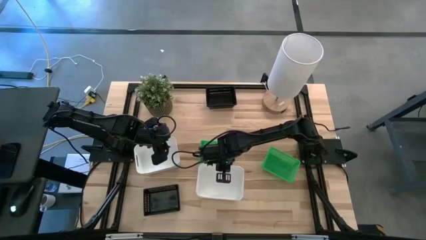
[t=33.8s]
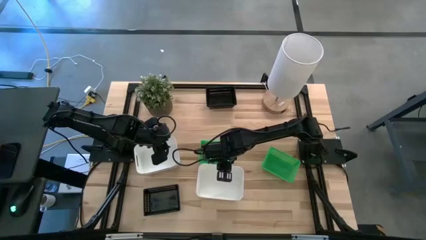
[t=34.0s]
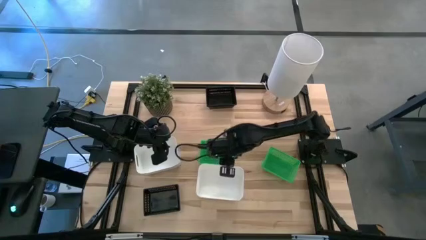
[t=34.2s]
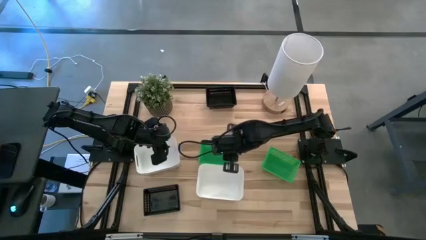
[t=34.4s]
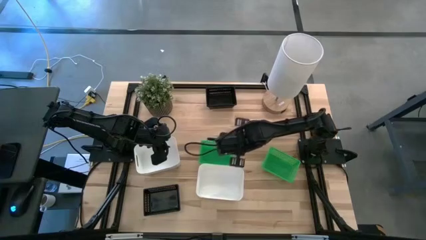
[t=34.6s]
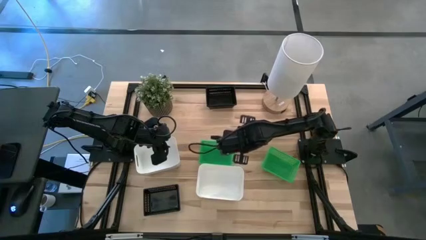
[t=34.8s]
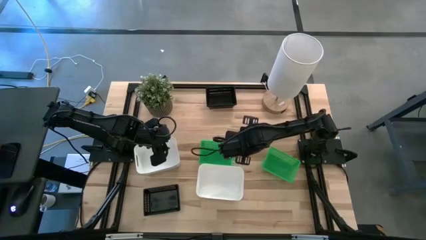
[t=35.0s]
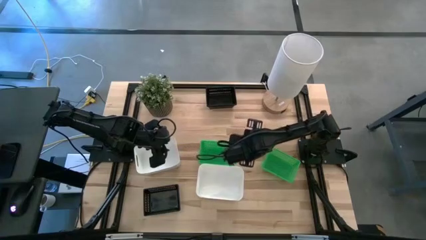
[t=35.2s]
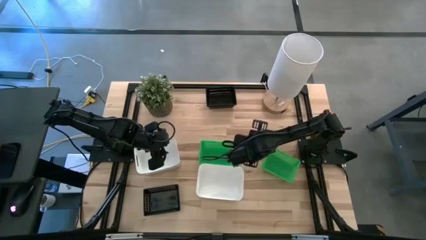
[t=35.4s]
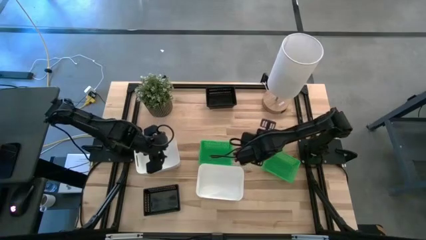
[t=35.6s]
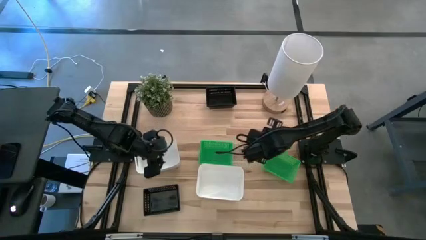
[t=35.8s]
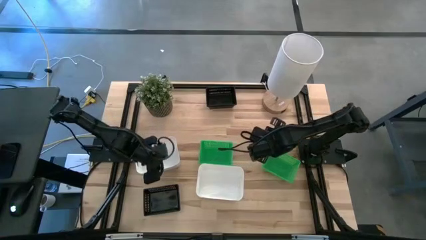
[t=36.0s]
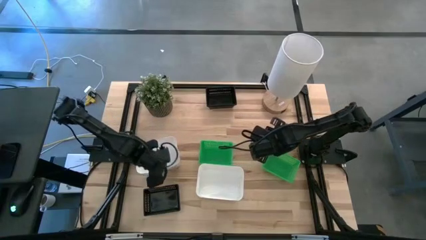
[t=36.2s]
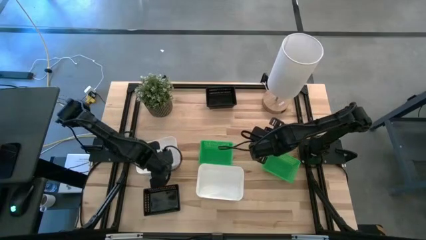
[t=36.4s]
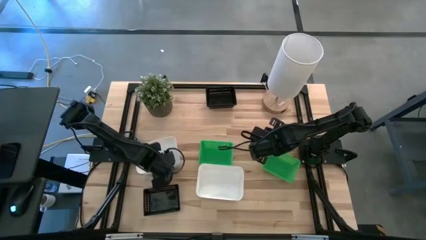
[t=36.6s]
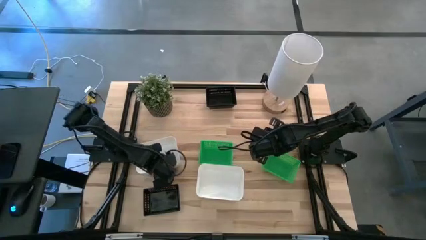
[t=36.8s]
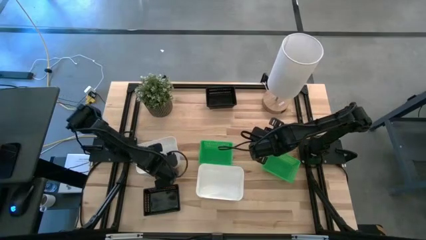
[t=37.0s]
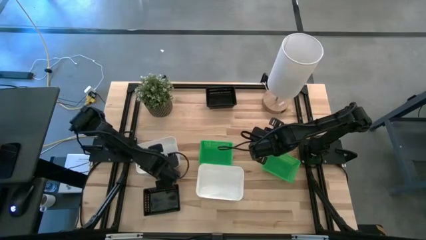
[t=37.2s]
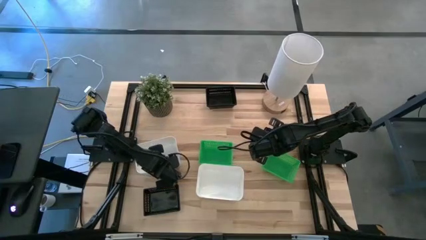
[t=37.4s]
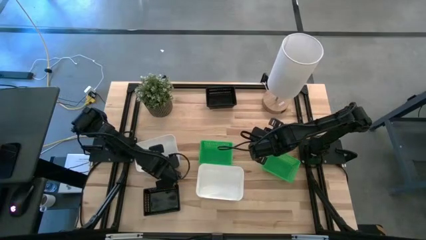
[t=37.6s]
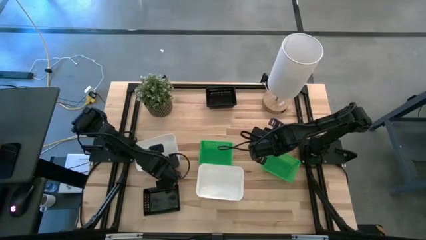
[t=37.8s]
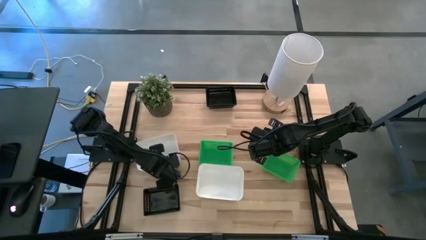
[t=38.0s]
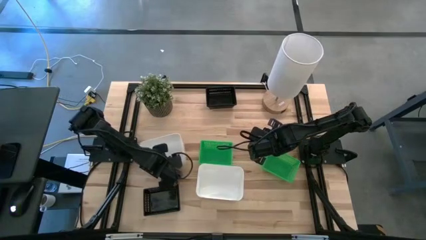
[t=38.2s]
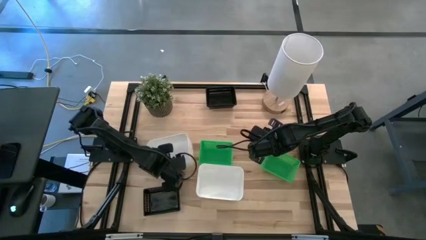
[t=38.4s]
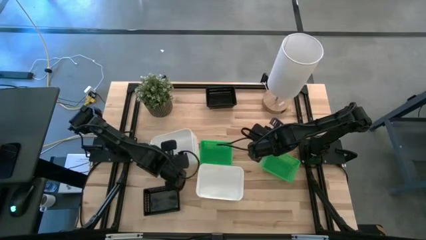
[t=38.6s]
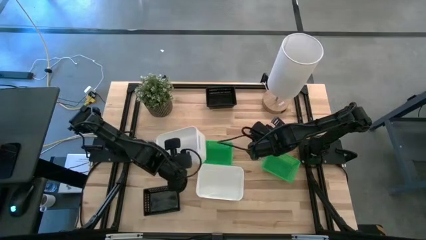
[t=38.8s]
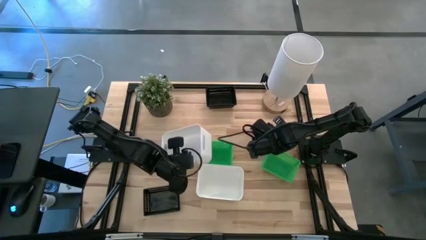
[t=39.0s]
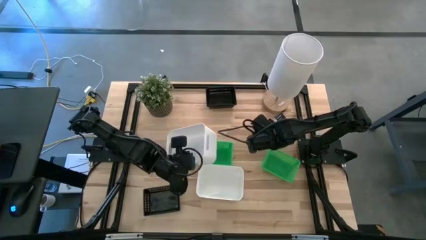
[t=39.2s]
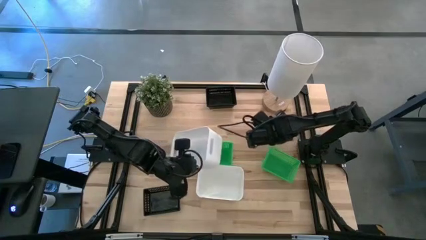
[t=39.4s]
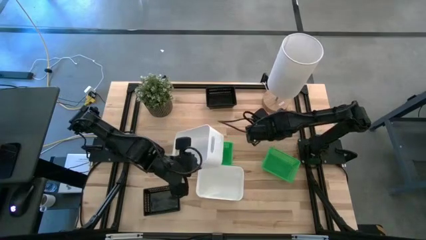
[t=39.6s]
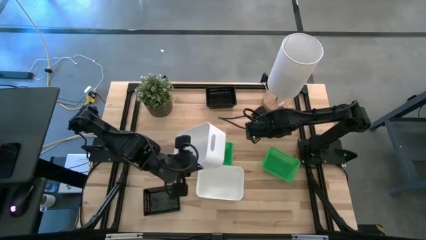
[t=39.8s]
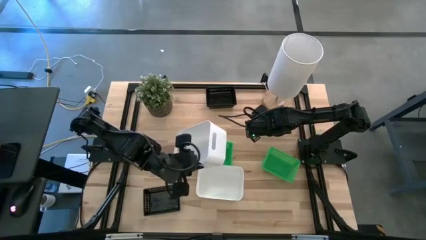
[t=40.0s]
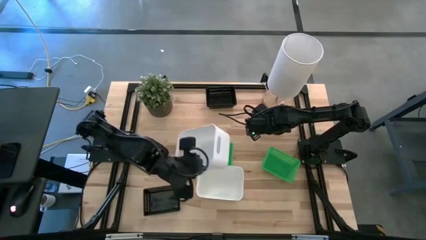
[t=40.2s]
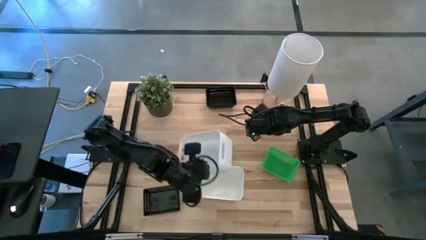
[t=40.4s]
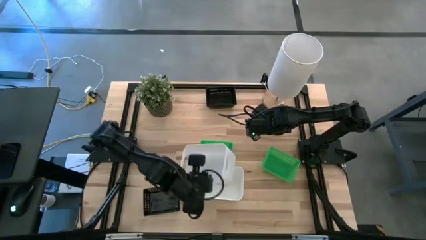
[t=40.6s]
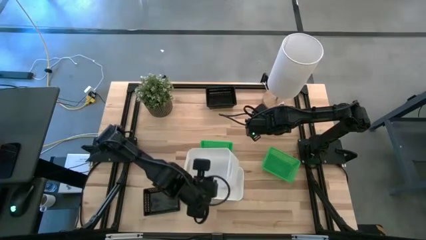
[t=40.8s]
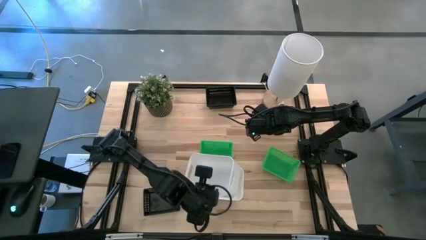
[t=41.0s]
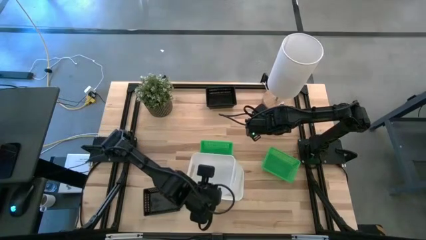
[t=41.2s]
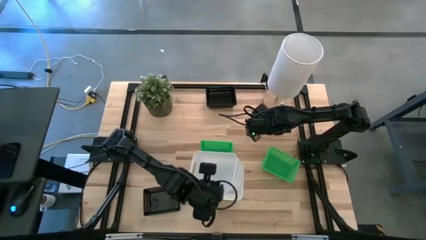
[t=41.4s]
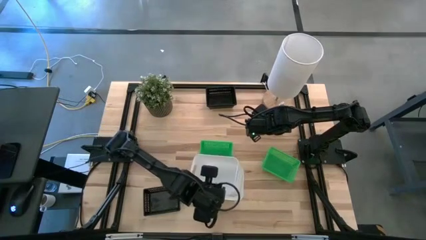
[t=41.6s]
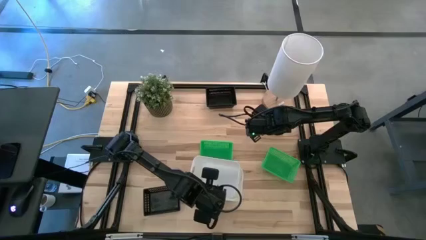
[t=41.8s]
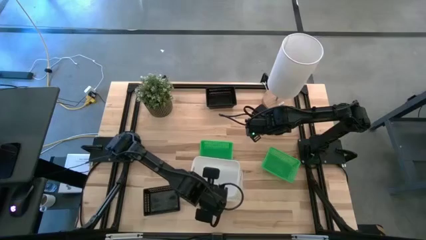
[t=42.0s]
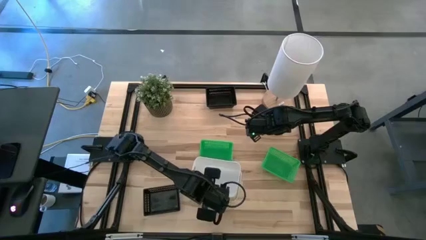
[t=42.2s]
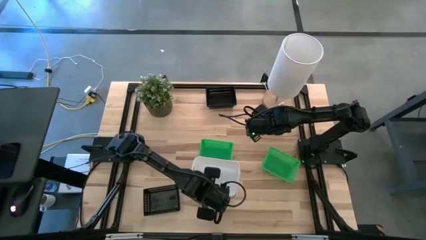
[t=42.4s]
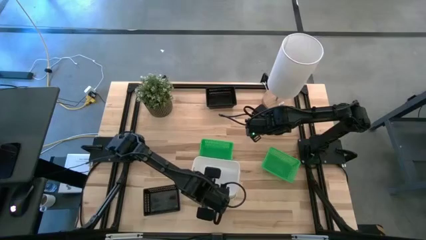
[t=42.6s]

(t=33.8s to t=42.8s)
Stack the left white bin on the right white bins

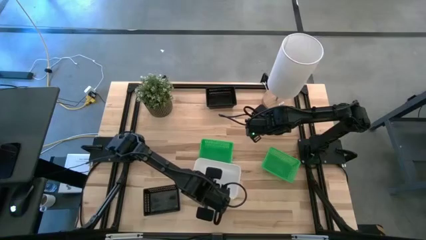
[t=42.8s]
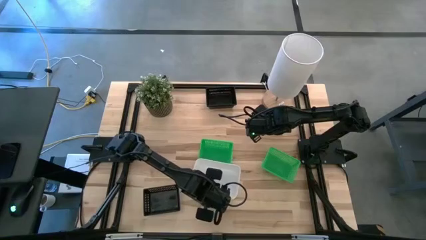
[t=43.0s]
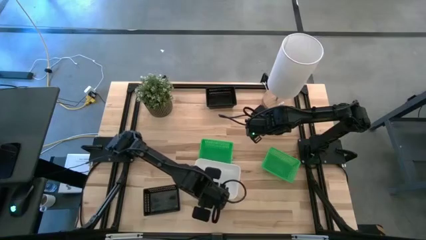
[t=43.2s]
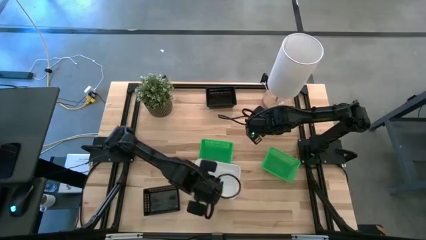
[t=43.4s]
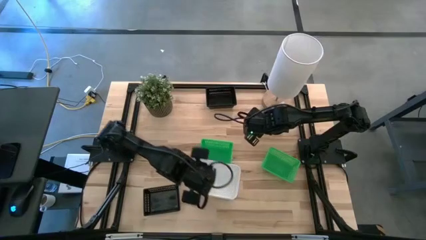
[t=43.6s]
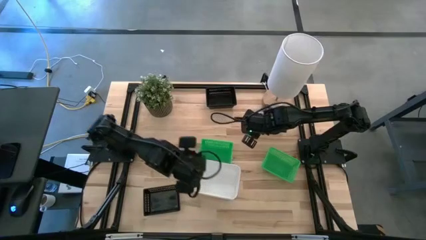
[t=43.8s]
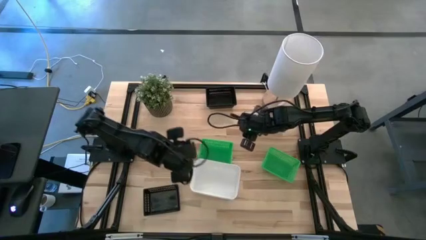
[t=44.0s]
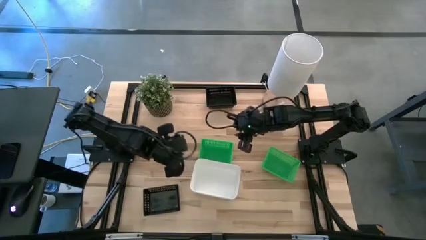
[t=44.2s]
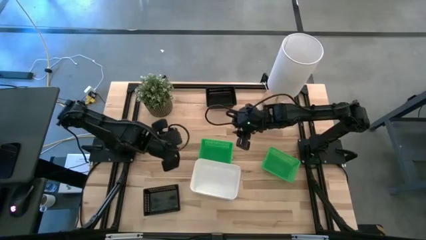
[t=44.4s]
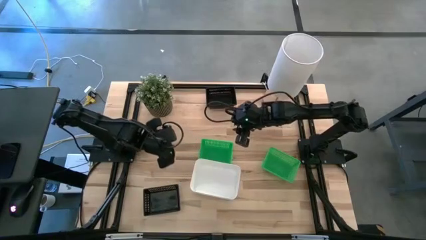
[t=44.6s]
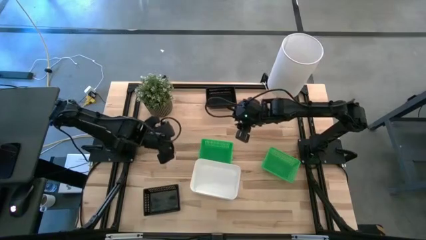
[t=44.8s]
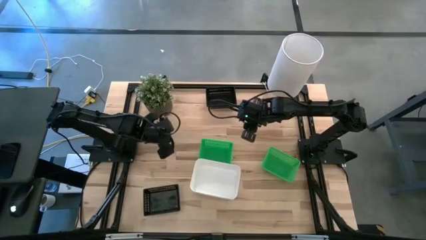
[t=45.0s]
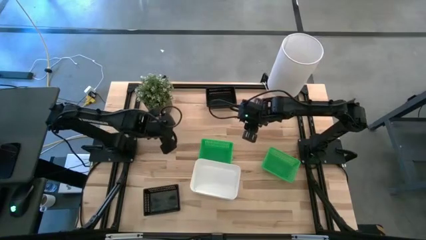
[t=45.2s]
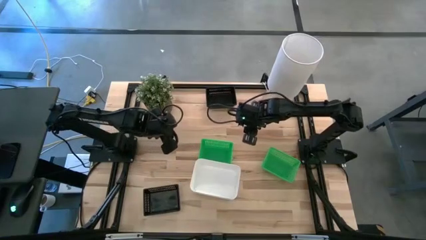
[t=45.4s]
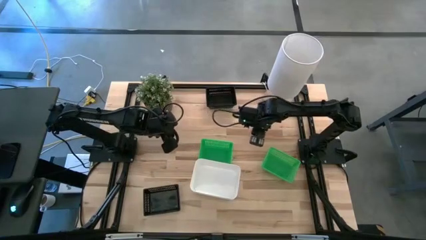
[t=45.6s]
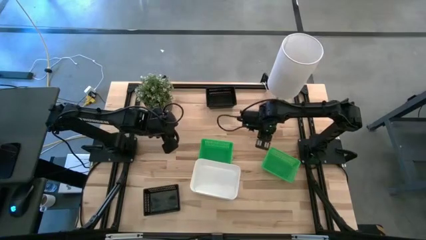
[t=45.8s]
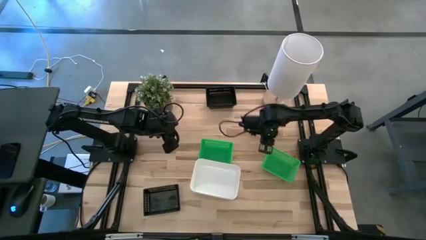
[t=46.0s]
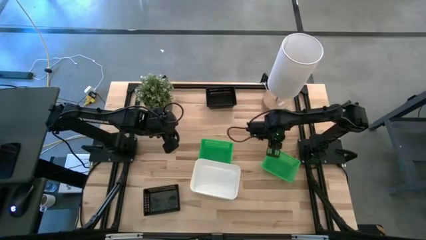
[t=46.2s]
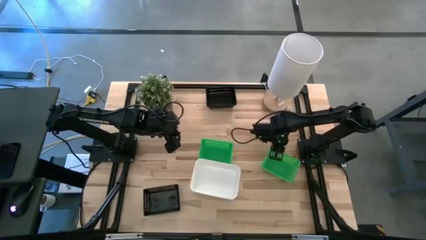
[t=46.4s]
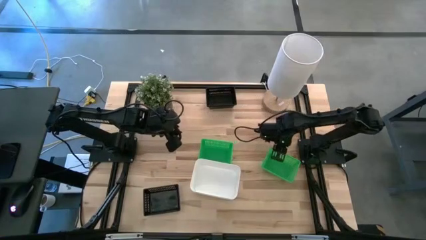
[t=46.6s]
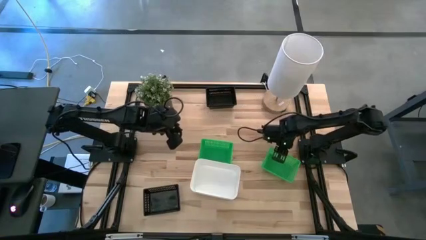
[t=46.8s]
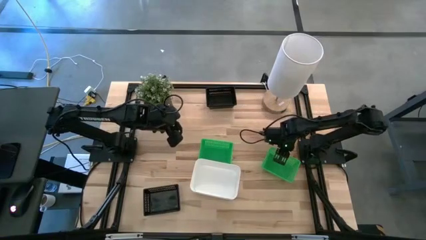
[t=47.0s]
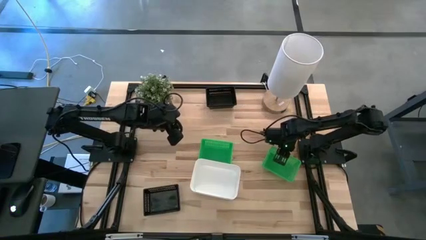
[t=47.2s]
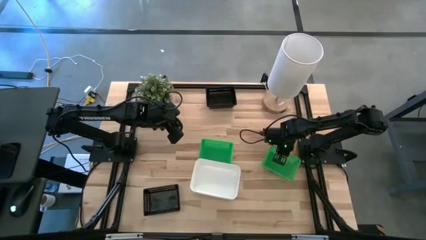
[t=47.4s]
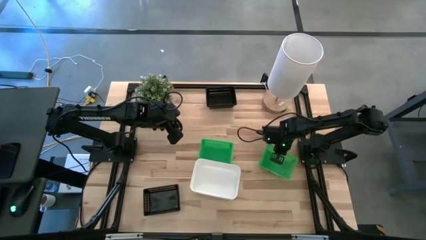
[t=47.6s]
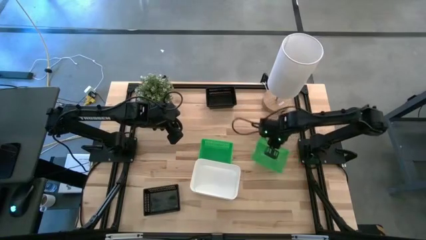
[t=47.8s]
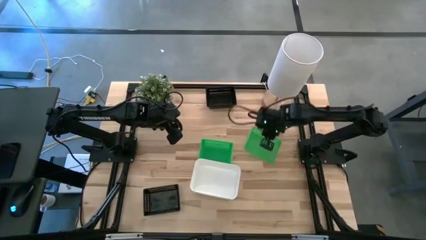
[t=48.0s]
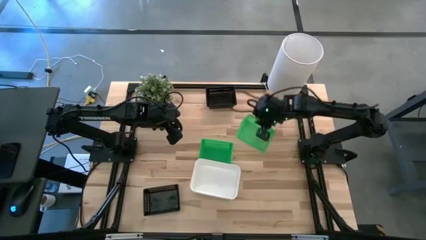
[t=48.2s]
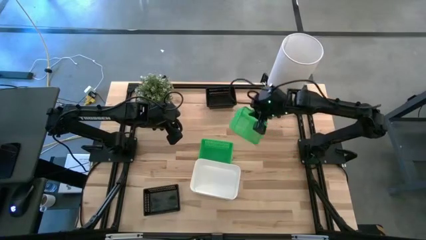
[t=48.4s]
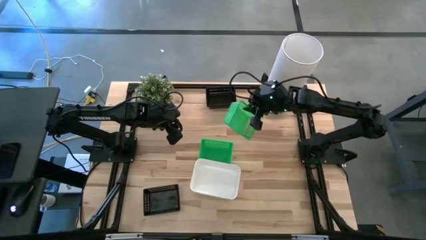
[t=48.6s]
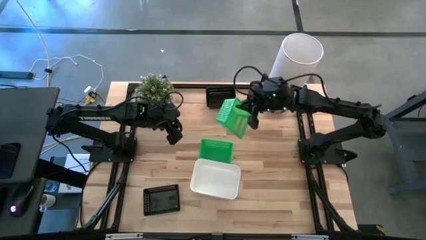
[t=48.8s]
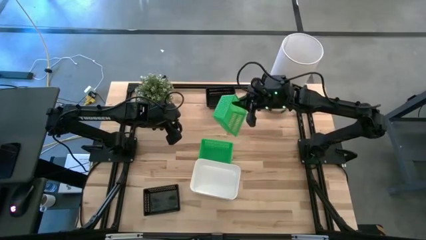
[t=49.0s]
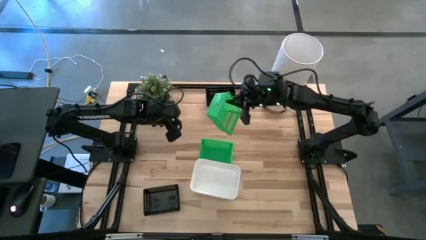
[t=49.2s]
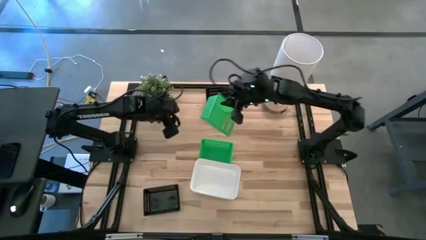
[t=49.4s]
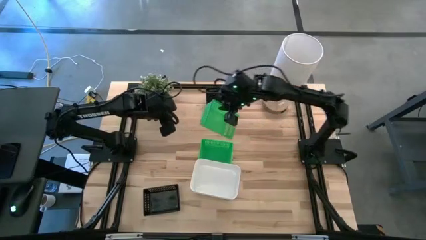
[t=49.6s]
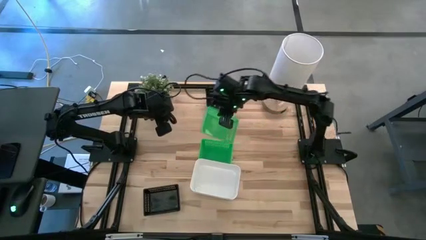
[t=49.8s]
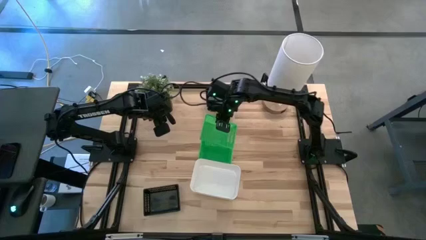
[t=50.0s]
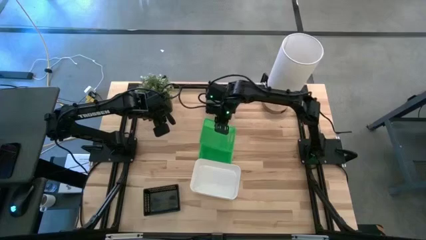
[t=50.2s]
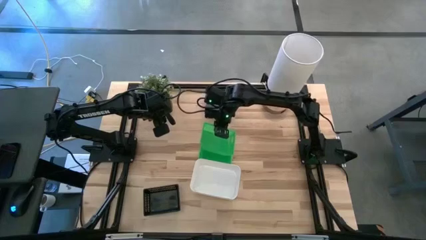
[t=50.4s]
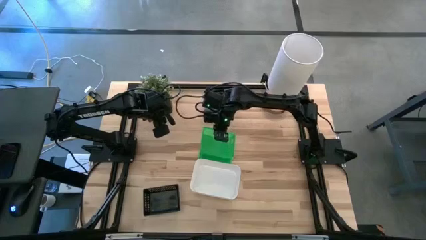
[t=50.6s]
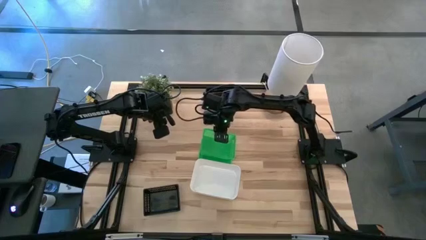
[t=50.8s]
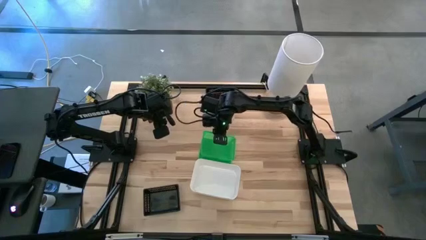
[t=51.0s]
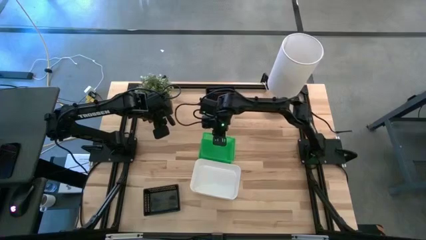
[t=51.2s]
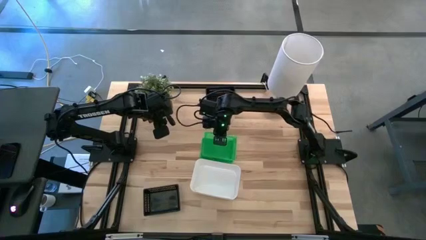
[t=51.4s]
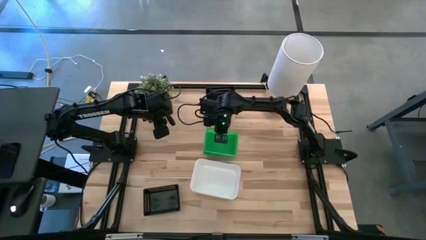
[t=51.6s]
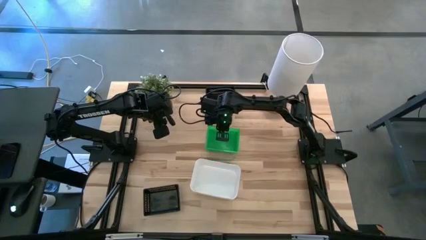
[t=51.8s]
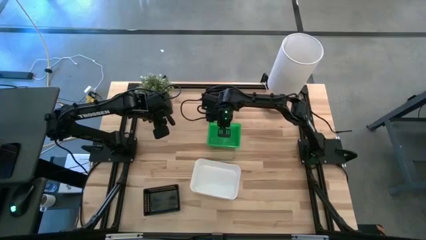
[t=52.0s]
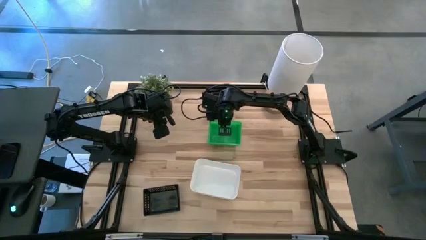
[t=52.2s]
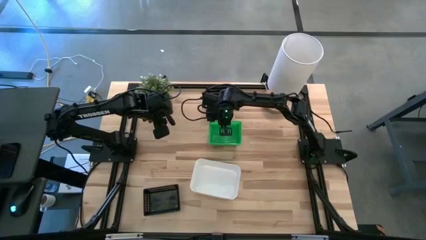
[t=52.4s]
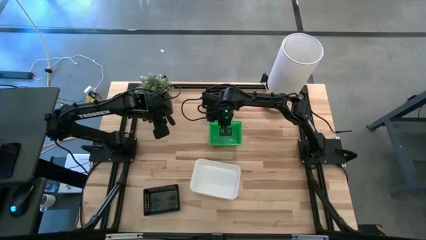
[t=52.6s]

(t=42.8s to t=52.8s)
Stack the right green bin on the left green bins
